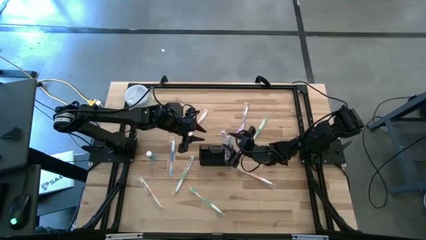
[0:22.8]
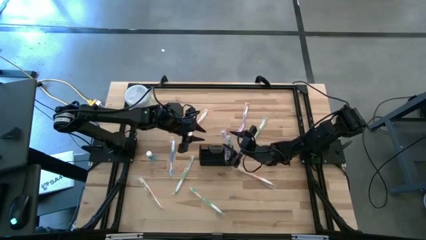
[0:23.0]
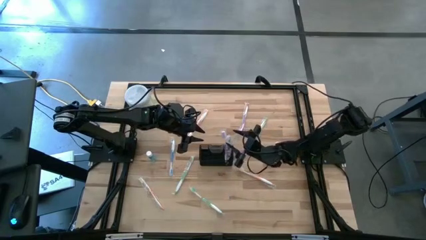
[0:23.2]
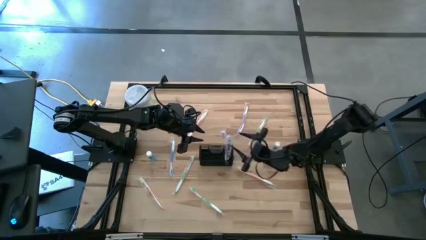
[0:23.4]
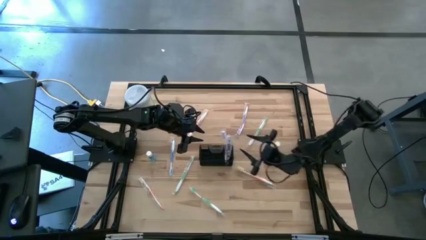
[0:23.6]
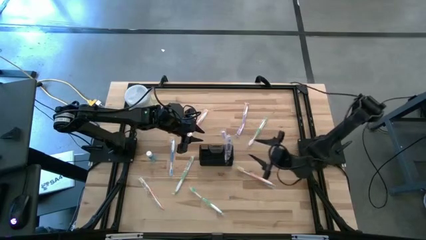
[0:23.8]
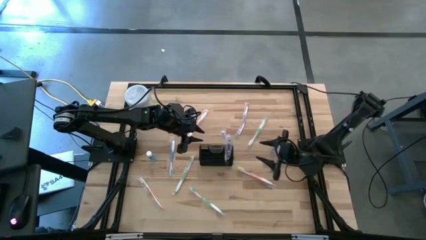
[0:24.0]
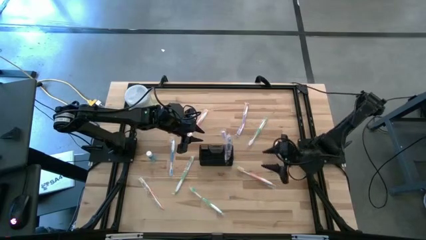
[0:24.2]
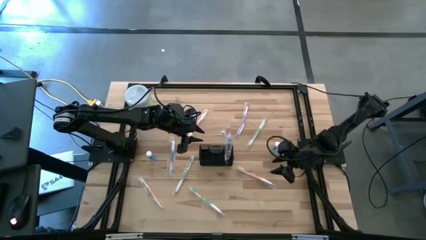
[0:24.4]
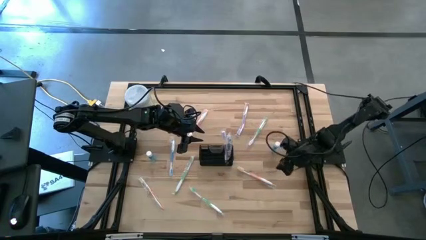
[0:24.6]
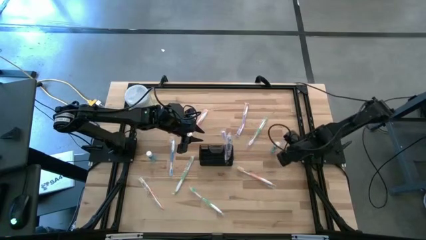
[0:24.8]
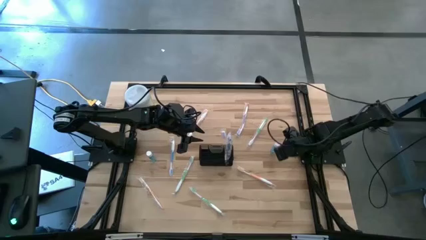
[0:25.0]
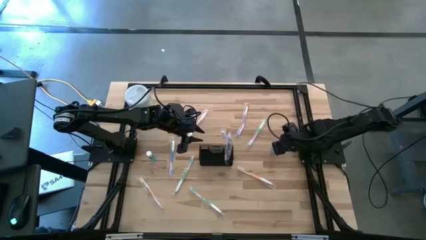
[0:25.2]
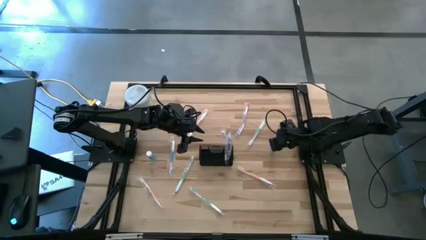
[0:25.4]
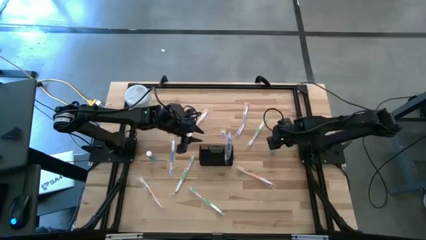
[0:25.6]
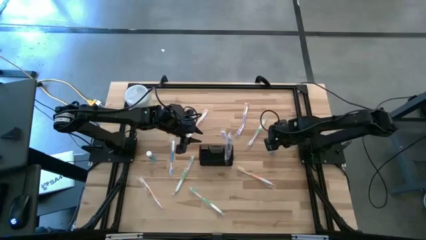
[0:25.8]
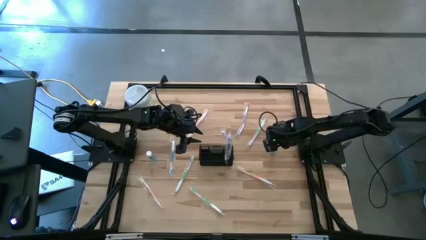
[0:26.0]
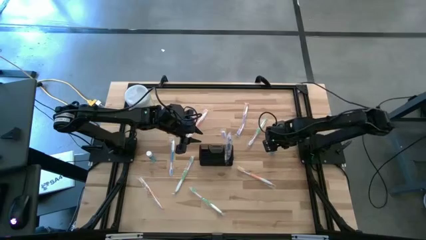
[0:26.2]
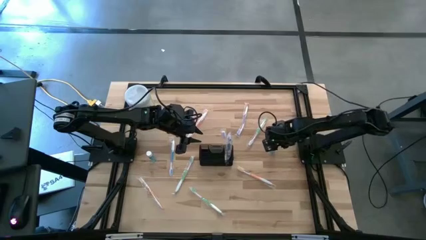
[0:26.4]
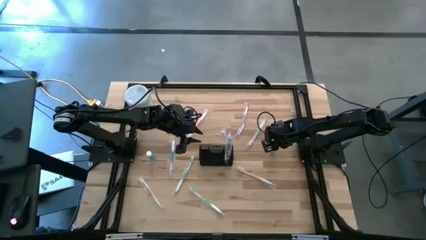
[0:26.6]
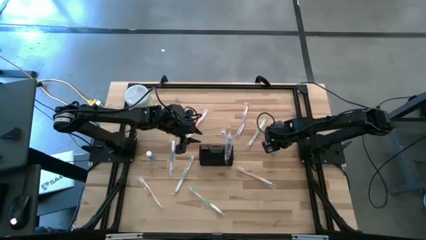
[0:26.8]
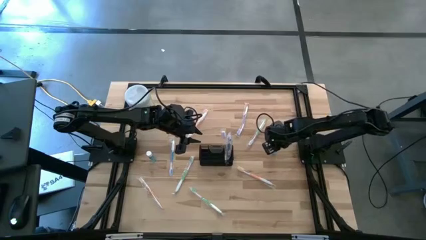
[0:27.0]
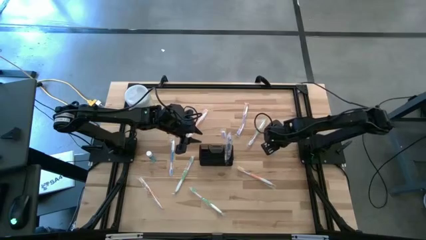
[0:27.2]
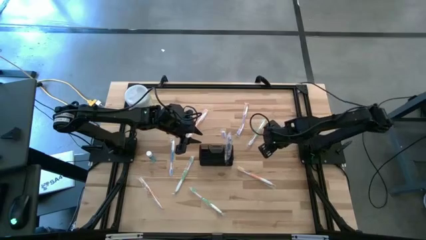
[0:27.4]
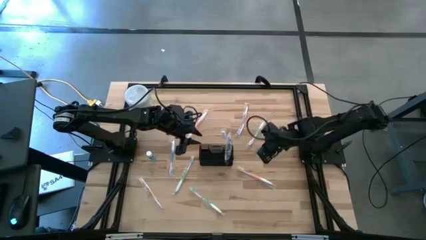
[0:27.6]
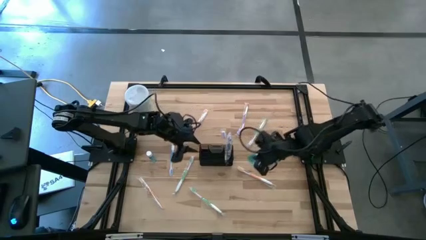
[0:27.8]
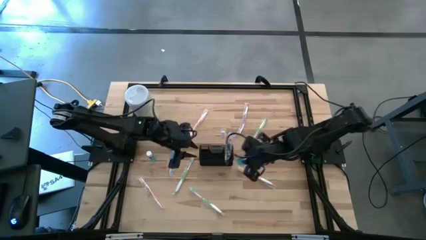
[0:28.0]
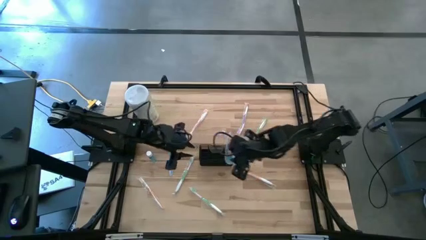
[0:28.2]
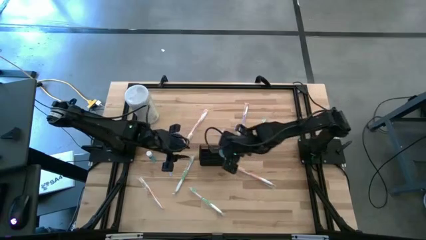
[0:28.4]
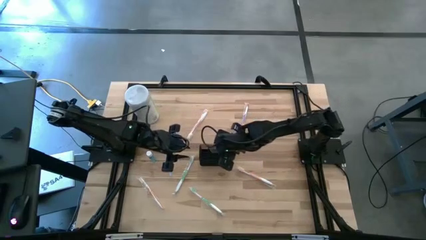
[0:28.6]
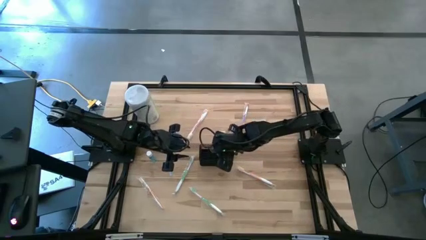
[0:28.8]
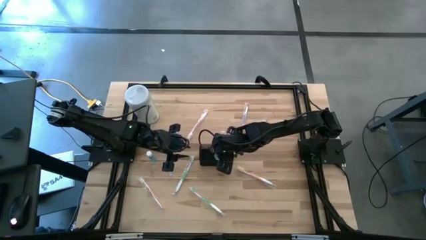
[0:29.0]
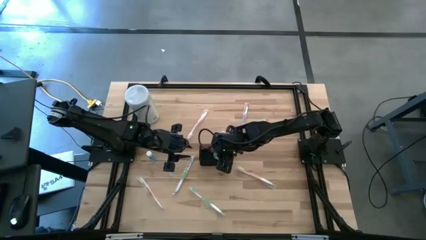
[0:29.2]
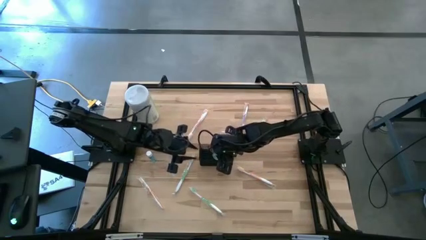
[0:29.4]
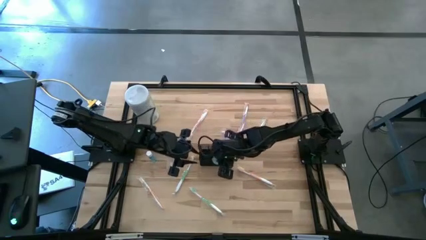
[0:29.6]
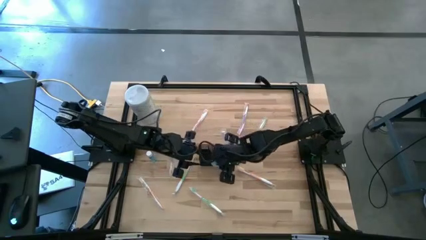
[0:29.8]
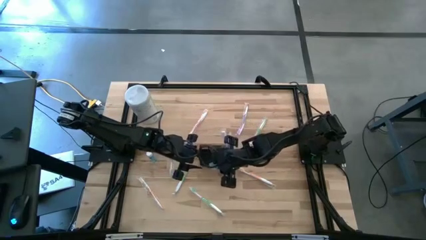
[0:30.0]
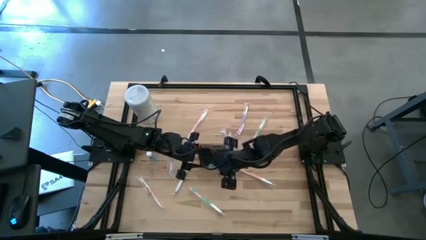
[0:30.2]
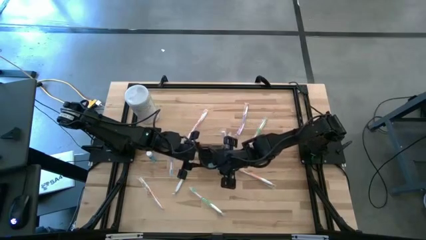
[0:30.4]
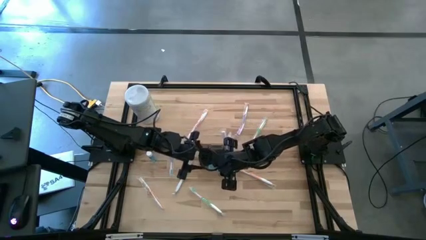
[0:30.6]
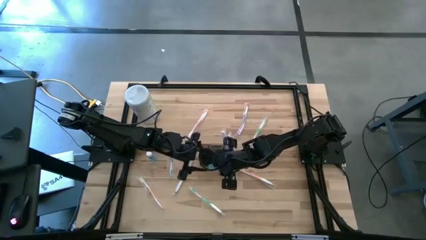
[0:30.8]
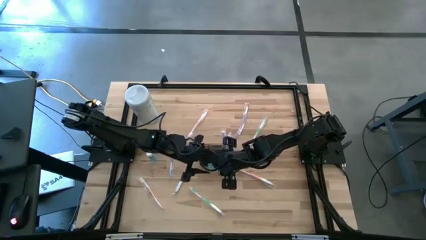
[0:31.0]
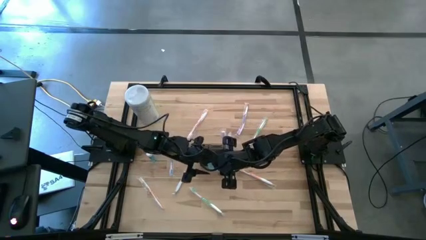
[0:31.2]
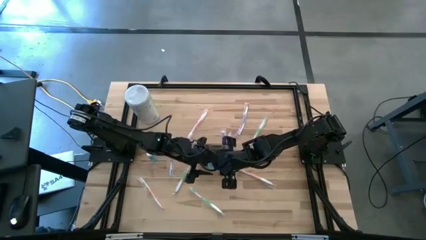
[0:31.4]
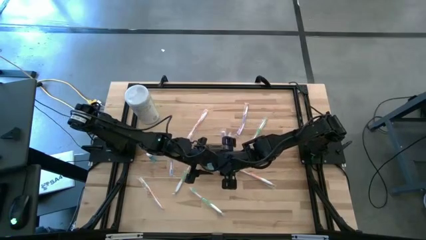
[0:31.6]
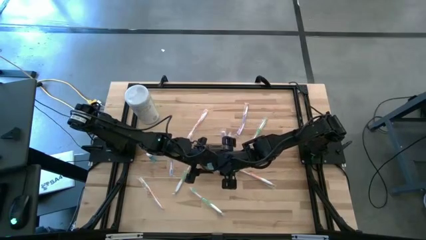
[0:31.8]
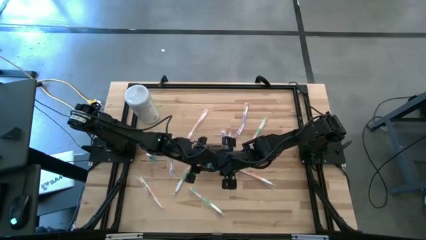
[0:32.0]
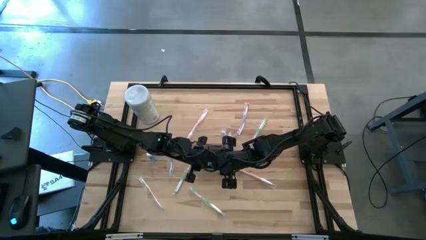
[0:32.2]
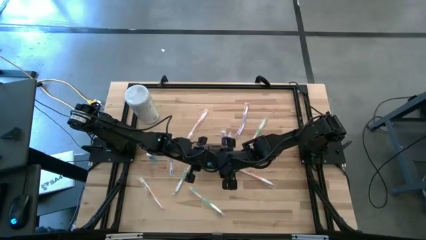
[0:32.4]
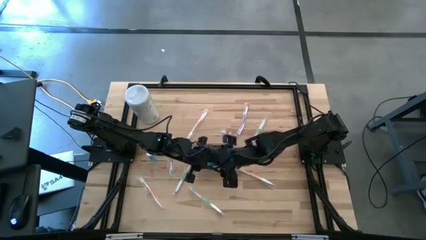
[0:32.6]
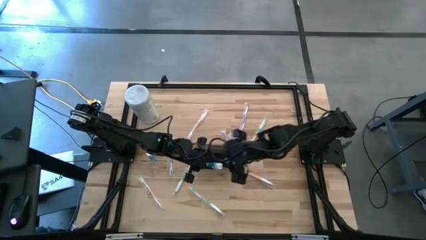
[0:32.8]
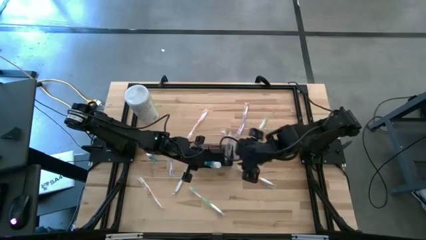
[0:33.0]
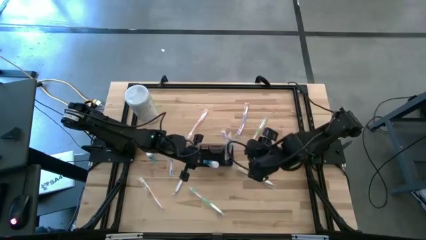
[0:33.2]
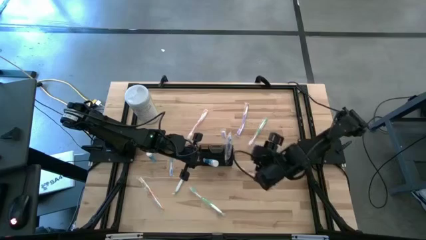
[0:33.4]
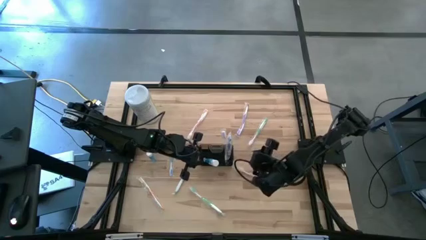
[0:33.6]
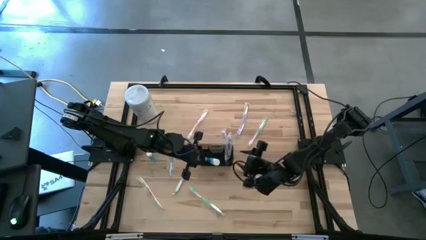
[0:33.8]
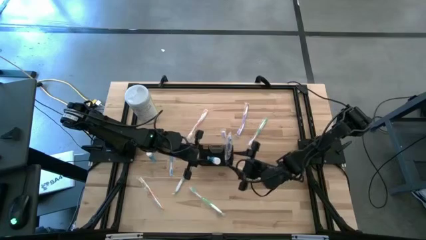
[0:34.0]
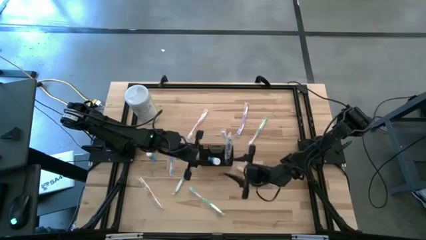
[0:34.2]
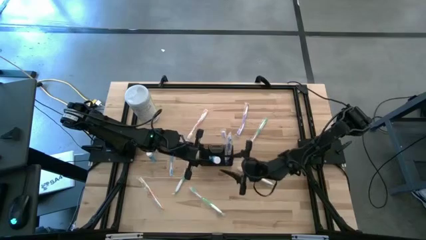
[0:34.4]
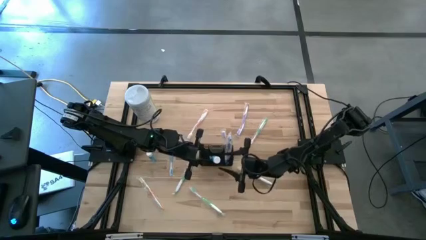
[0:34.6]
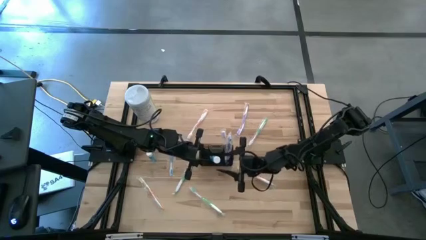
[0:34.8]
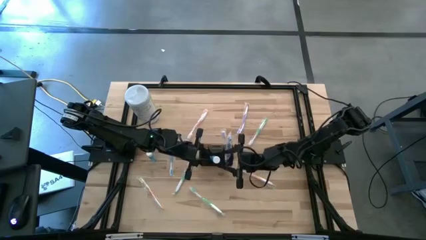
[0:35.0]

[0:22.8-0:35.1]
Task: Pick & Place toothbrushing station
Put the right blue mouthwash into the black mesh
